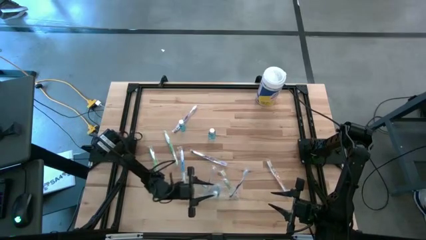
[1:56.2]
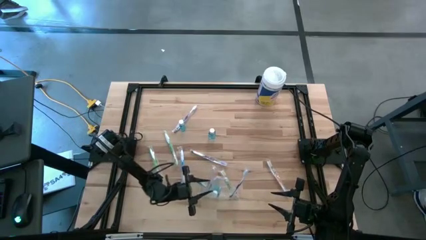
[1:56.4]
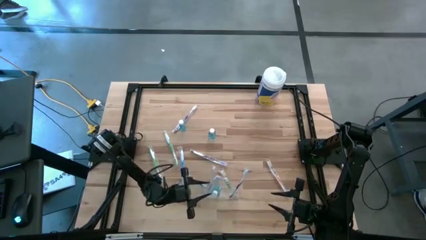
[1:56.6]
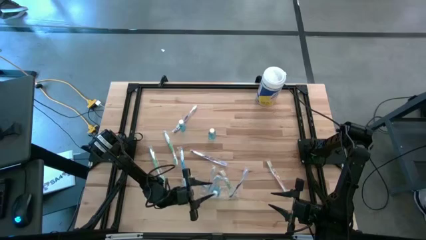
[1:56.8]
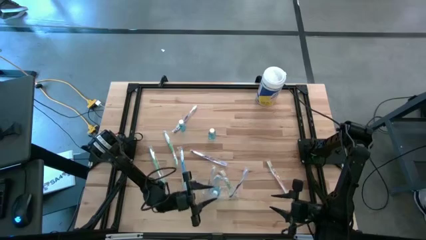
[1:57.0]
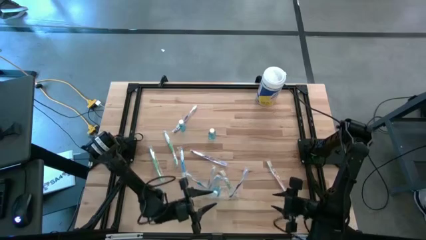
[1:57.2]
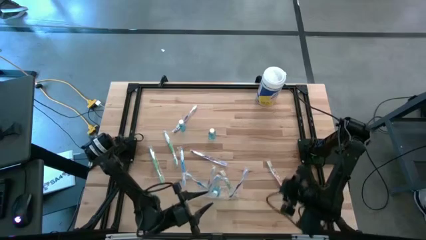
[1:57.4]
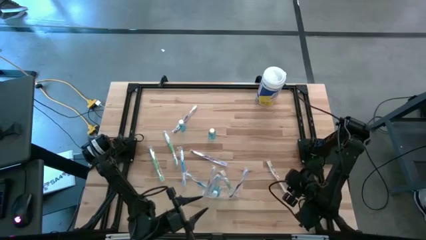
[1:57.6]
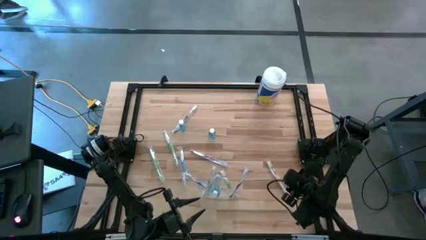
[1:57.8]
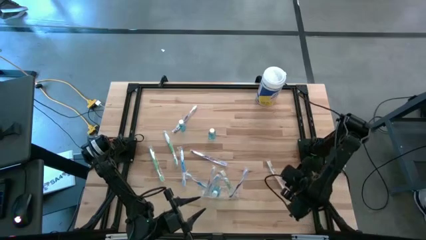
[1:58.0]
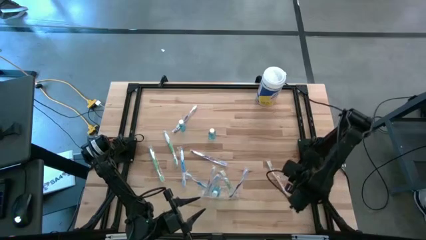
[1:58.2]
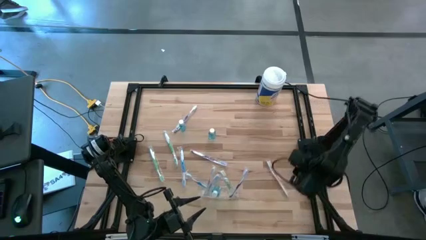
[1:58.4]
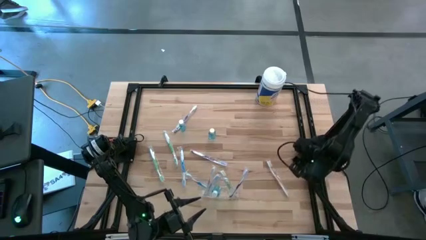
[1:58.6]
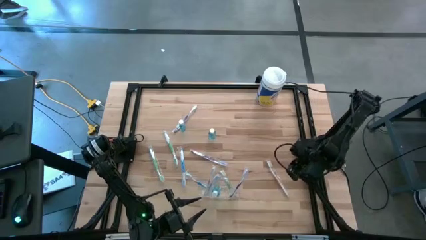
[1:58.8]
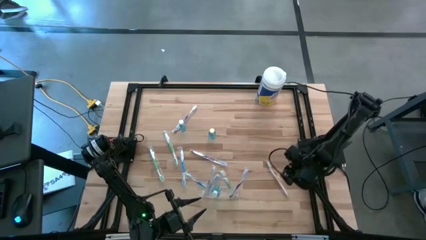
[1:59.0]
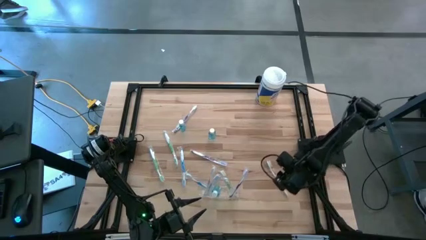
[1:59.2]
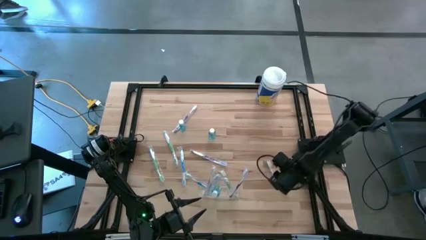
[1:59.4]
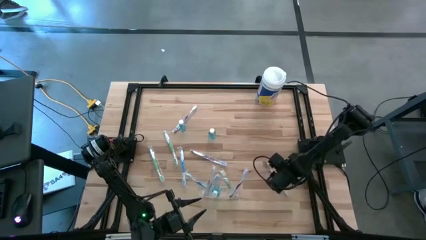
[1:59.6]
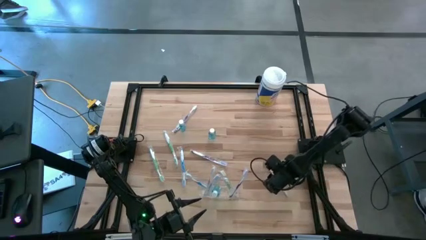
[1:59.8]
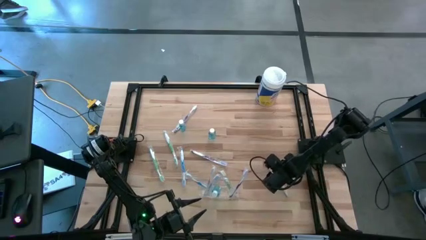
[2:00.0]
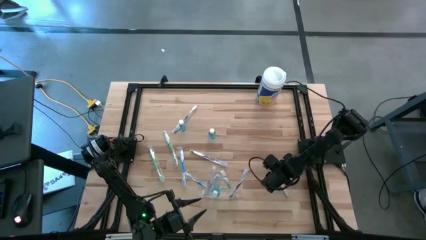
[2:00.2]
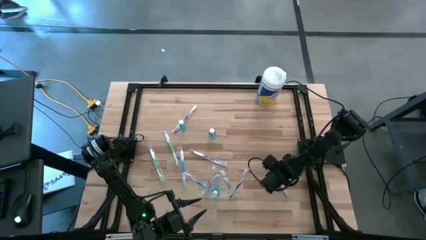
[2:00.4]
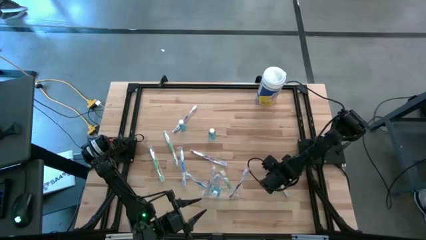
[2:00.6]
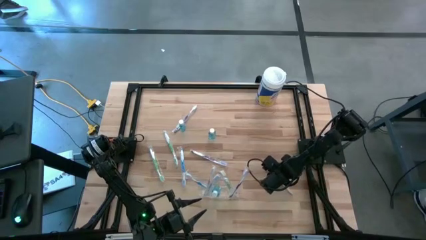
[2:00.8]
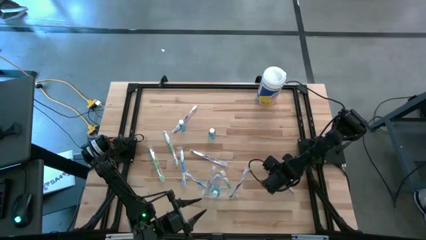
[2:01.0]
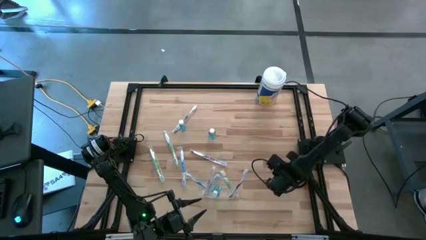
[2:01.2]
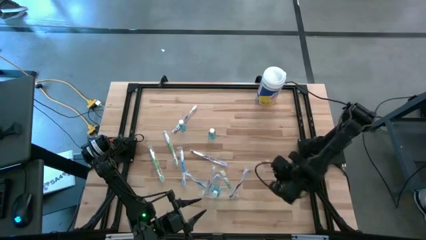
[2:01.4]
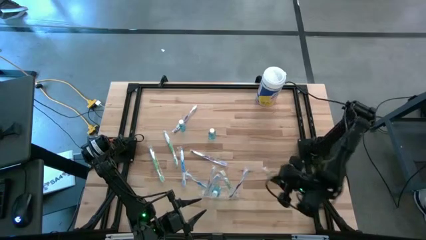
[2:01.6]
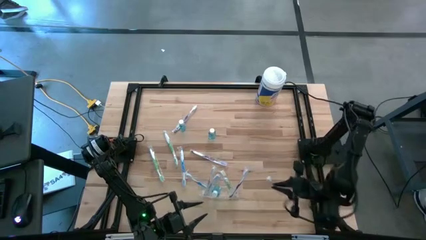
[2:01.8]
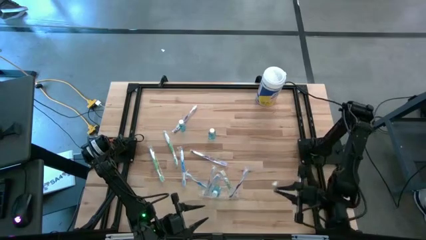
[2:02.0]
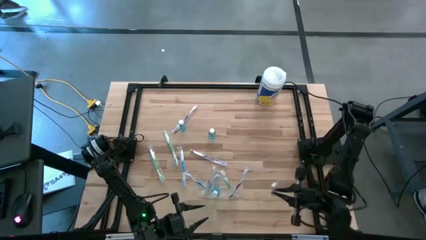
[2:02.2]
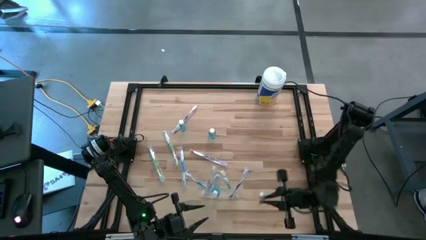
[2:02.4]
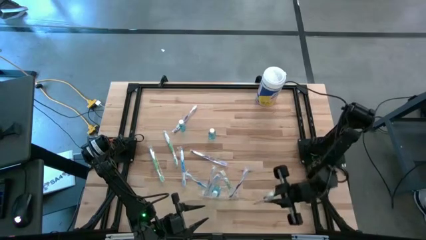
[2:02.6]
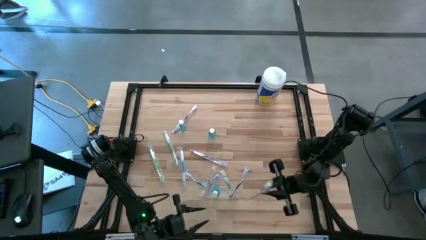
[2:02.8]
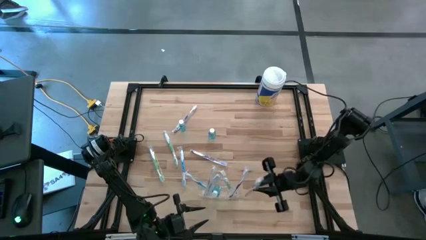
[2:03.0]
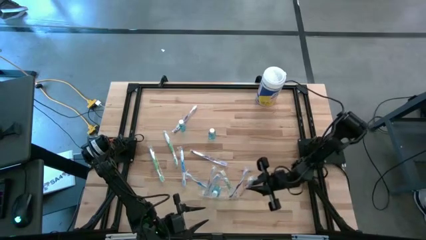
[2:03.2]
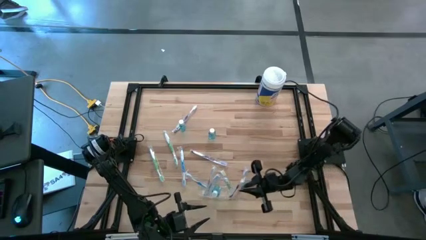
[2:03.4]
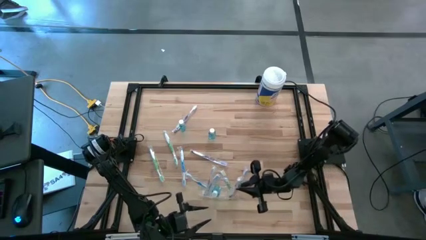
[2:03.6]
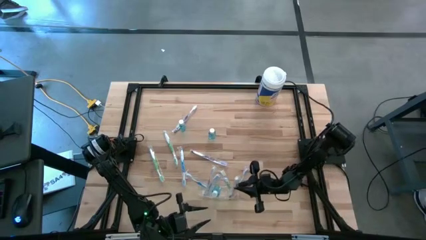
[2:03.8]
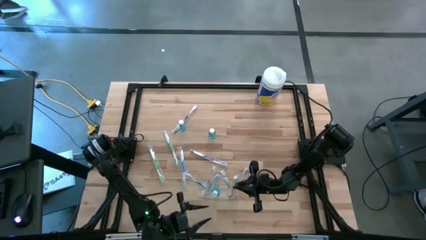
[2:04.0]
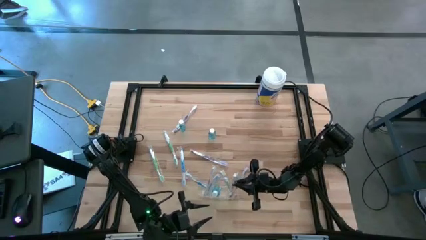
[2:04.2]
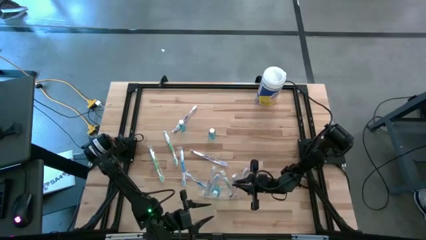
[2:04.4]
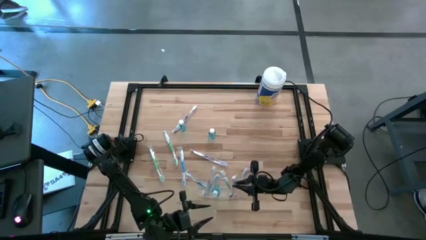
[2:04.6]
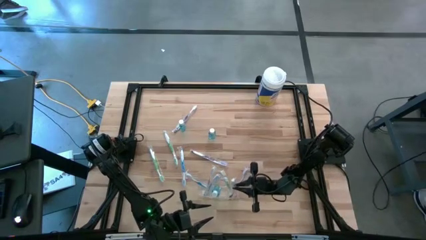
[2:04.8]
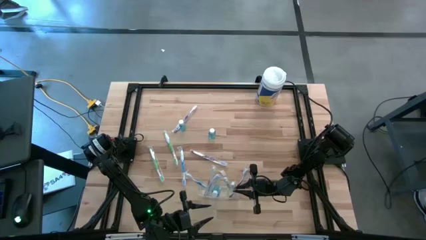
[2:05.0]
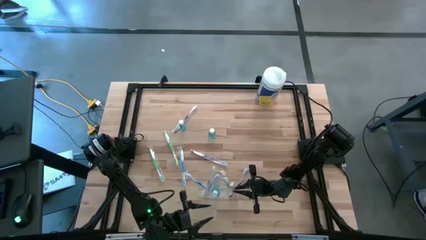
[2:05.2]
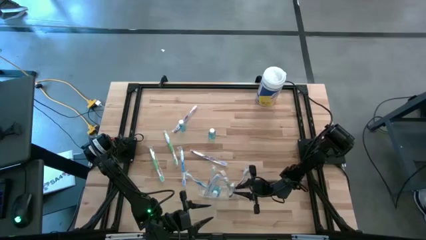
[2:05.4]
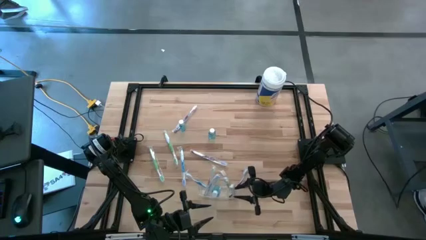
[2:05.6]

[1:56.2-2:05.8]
Task: Pick & Place toothbrushing station
Put the orange toothbrush into the transparent organizer

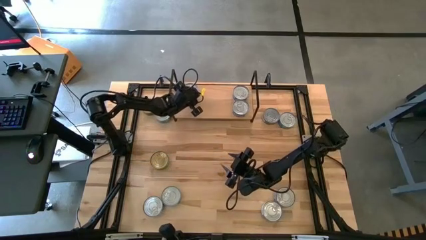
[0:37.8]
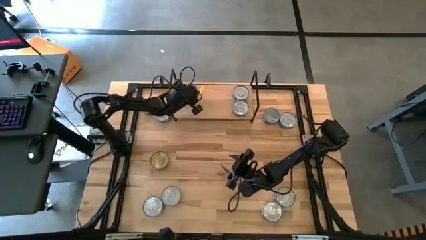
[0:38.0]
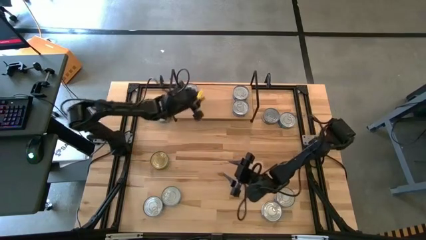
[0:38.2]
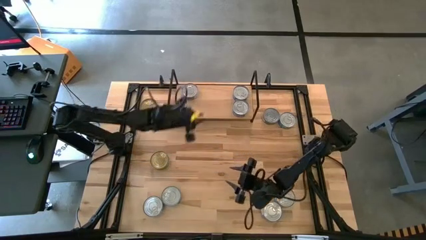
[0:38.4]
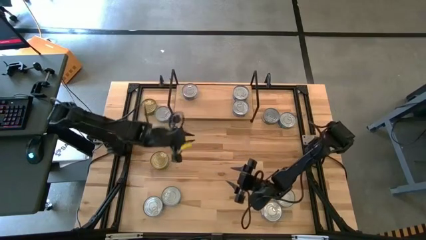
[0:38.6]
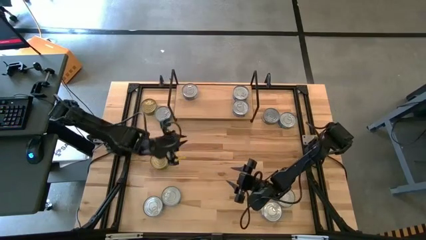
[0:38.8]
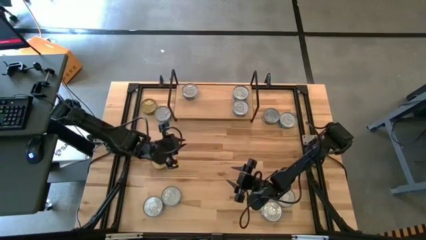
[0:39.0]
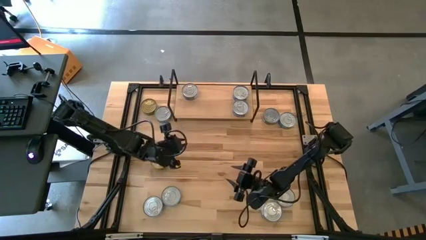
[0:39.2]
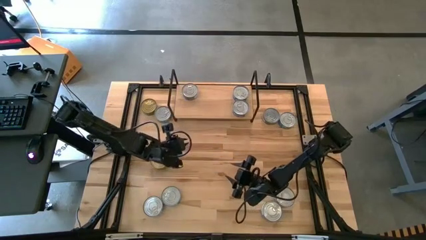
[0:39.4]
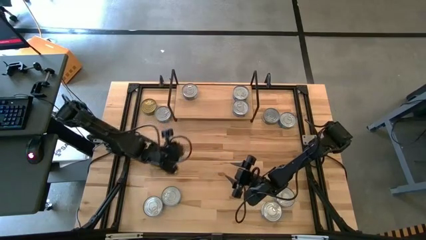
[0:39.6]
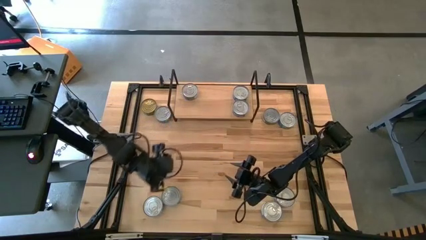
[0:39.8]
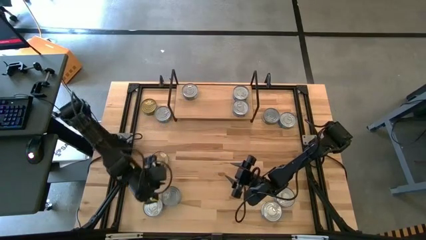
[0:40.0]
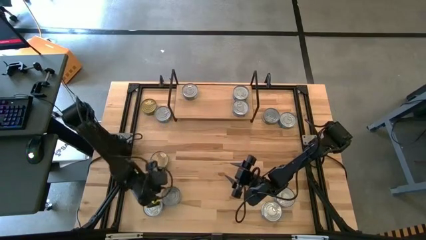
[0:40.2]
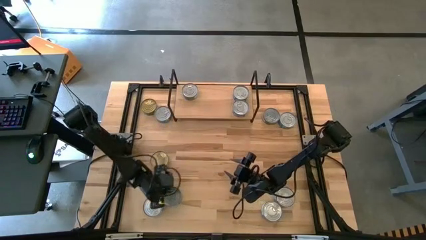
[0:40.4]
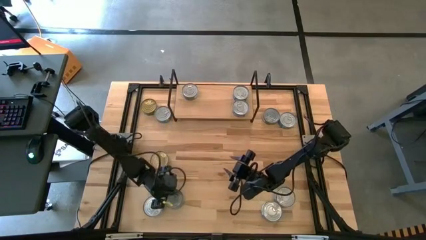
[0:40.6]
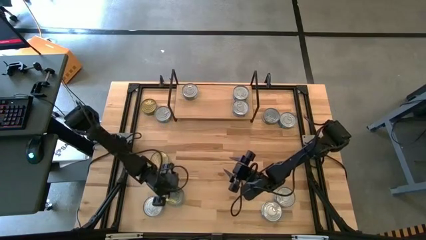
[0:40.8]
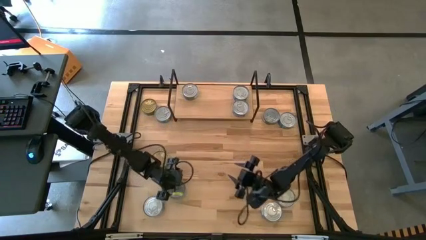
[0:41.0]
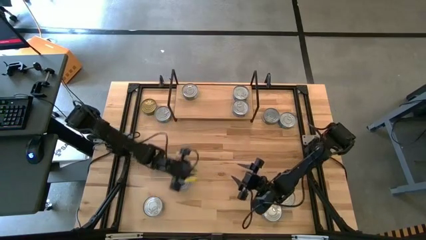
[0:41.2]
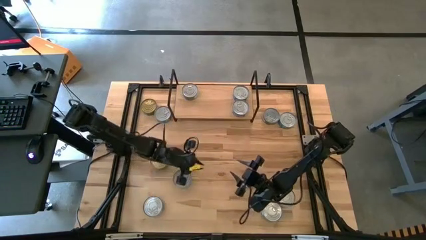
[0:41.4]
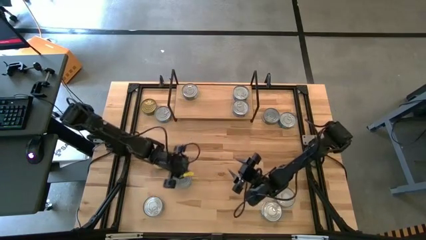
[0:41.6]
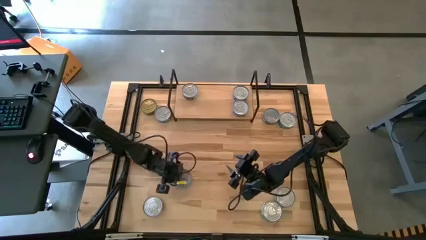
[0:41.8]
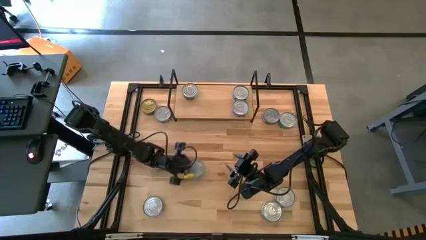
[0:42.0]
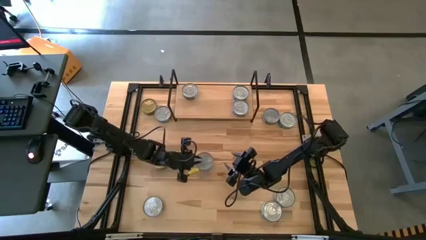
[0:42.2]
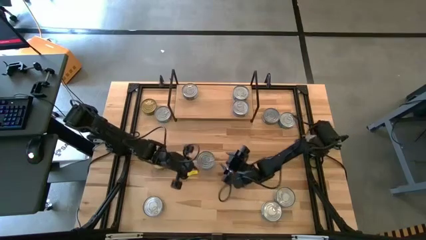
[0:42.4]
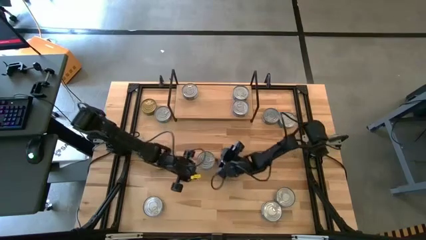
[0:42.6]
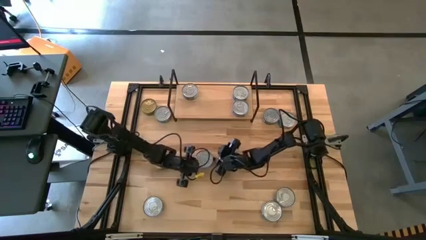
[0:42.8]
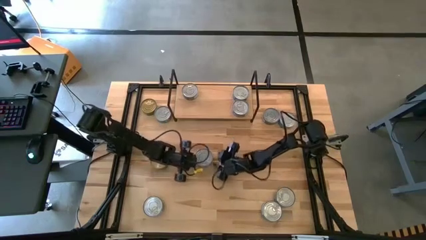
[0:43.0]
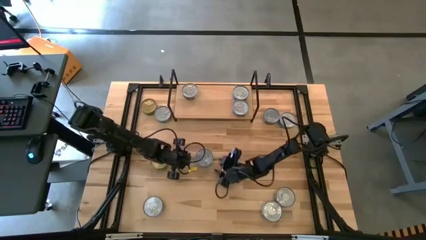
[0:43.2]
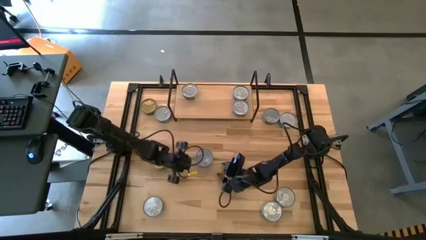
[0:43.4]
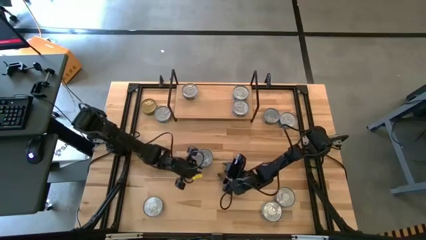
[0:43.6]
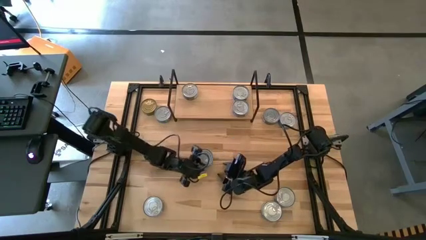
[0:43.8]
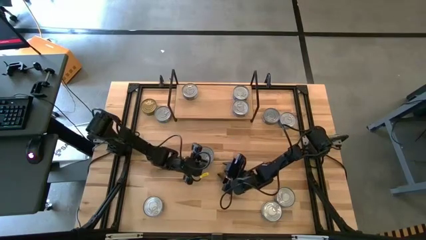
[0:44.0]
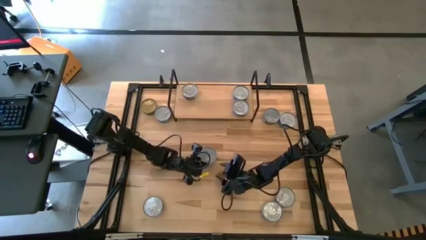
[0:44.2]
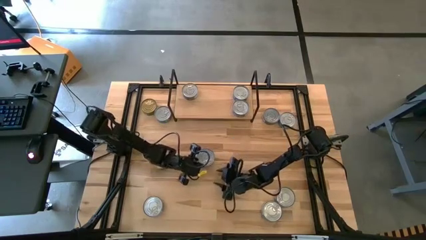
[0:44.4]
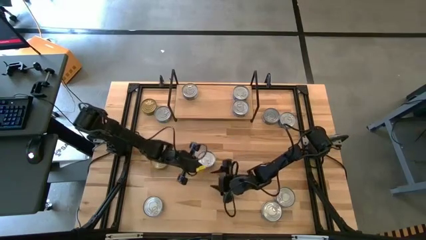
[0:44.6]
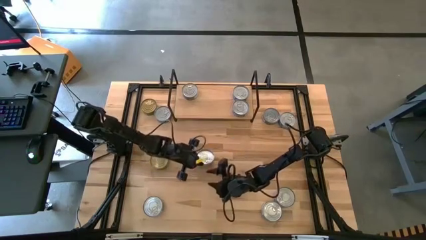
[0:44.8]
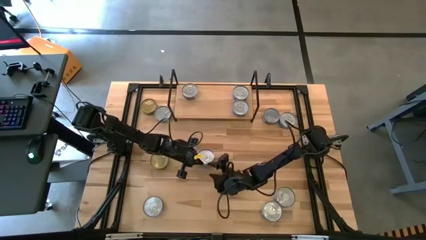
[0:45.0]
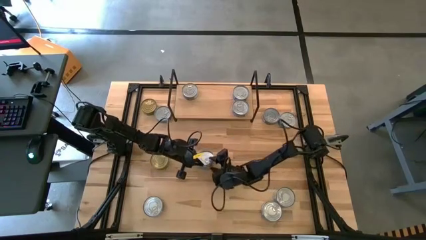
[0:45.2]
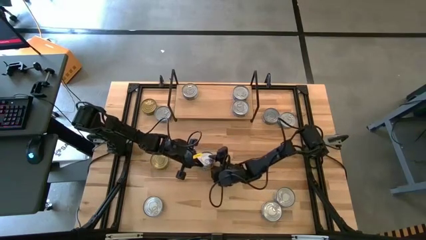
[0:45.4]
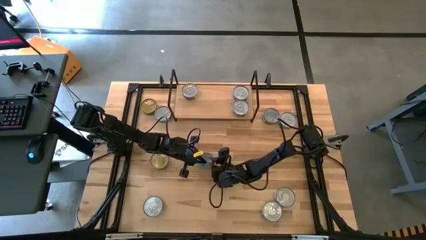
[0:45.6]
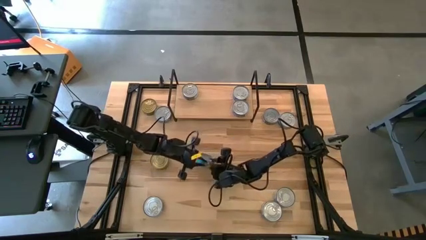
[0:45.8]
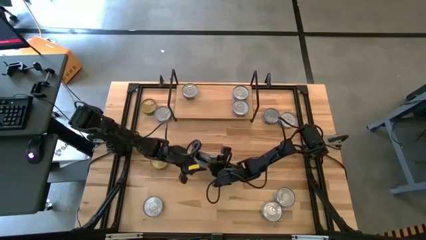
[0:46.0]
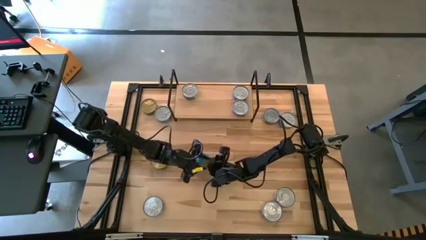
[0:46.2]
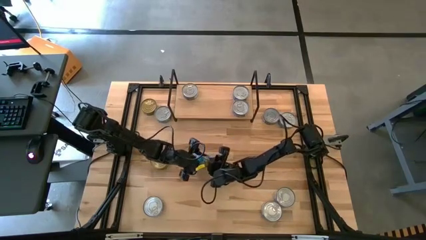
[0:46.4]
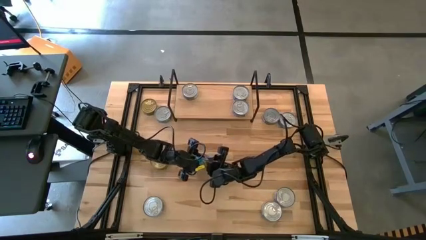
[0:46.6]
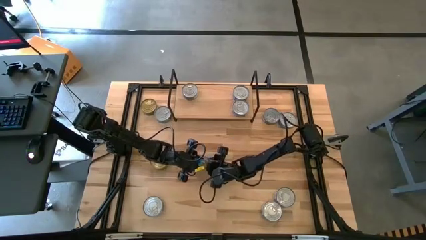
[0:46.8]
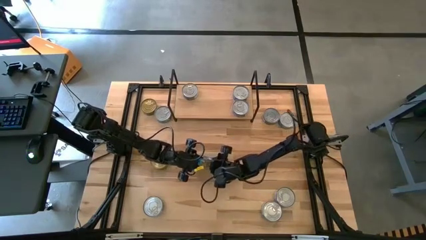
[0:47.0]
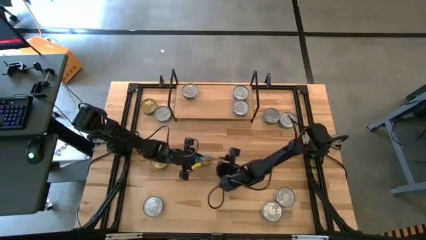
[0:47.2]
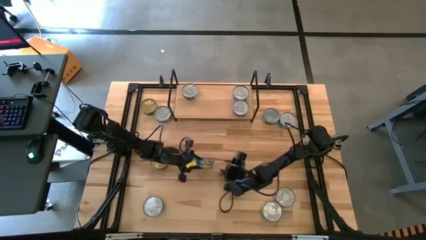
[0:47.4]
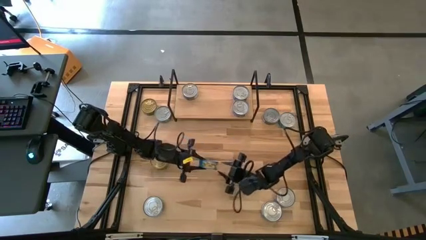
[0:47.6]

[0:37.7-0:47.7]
Task: Stack canned seafood by type on shelf
Put the yellow blue tuna can on the shelf
